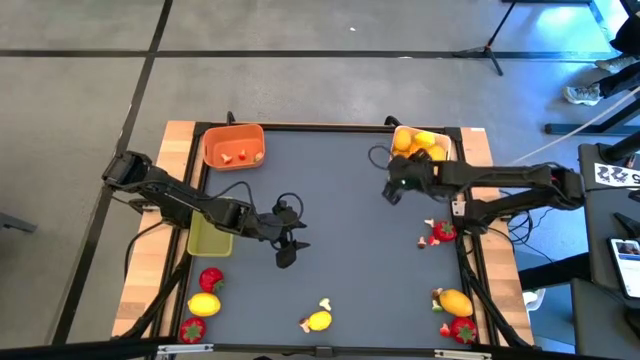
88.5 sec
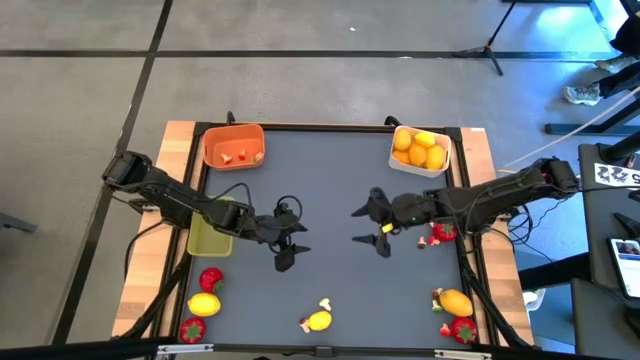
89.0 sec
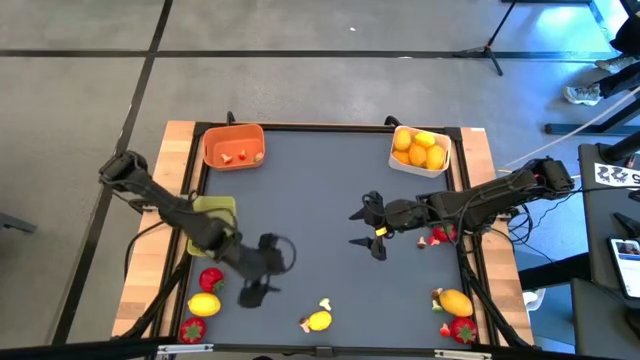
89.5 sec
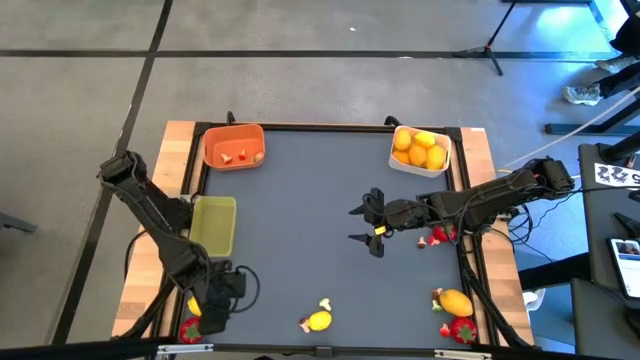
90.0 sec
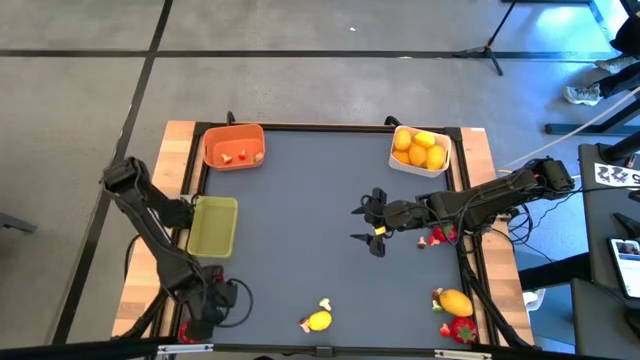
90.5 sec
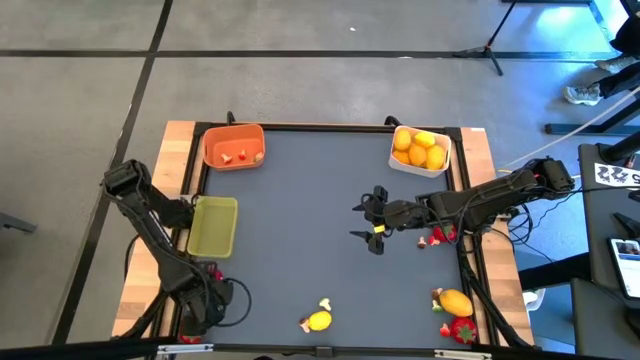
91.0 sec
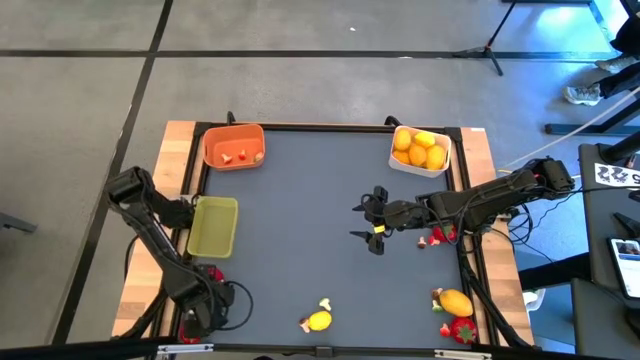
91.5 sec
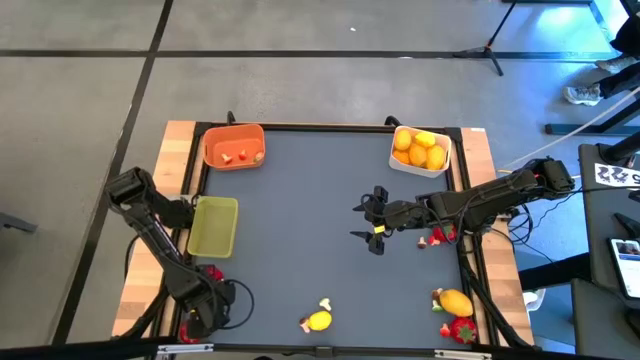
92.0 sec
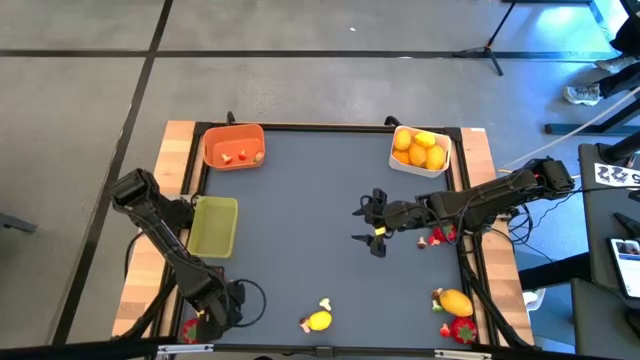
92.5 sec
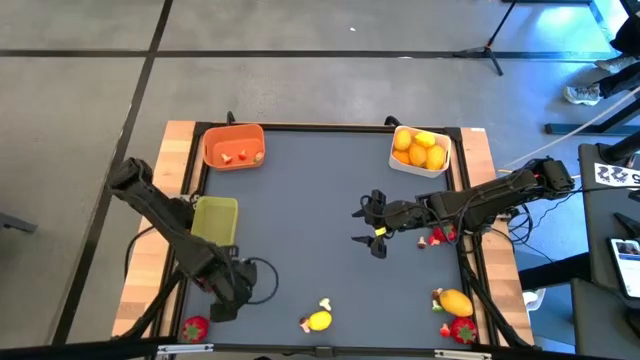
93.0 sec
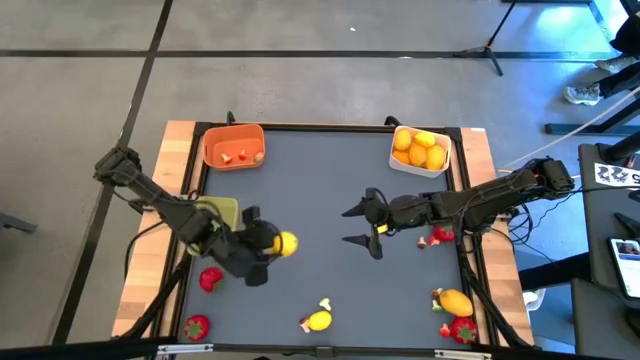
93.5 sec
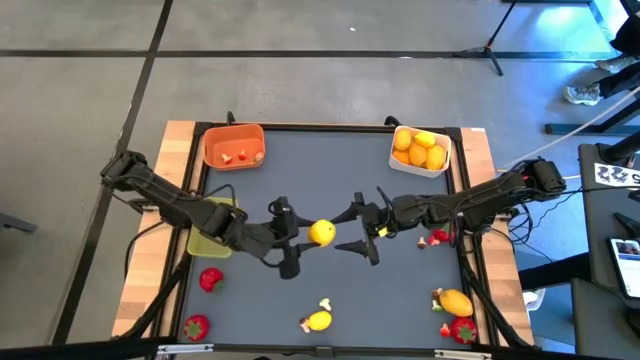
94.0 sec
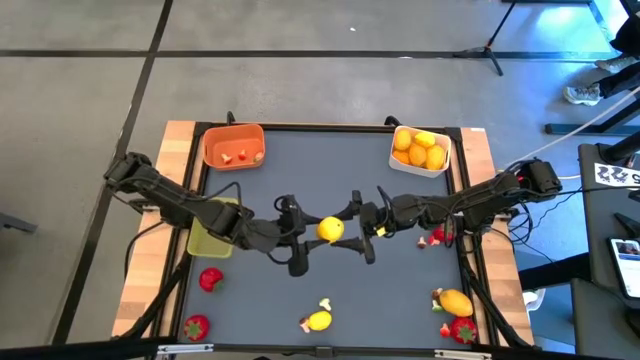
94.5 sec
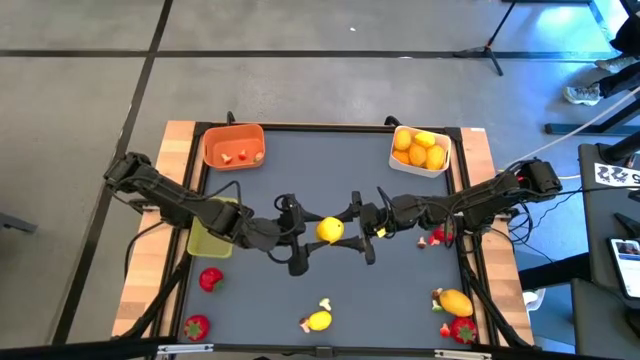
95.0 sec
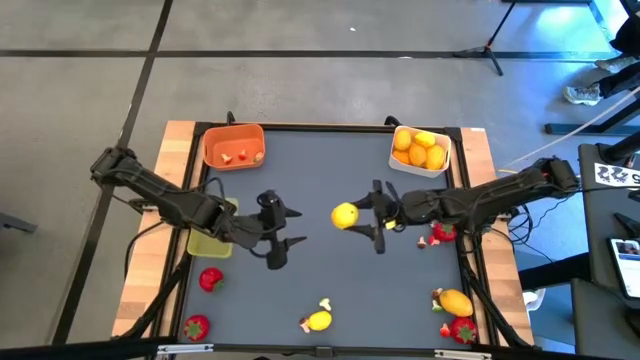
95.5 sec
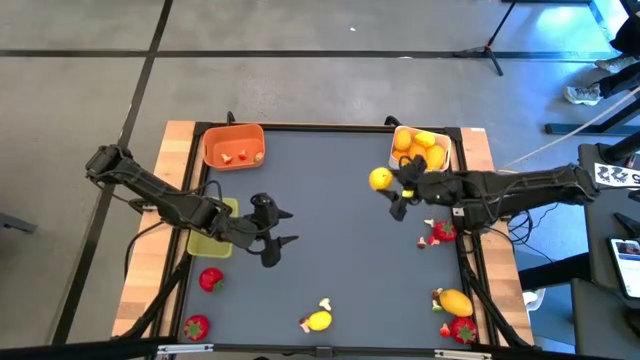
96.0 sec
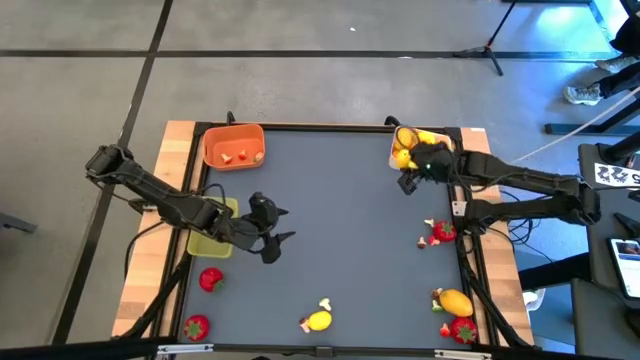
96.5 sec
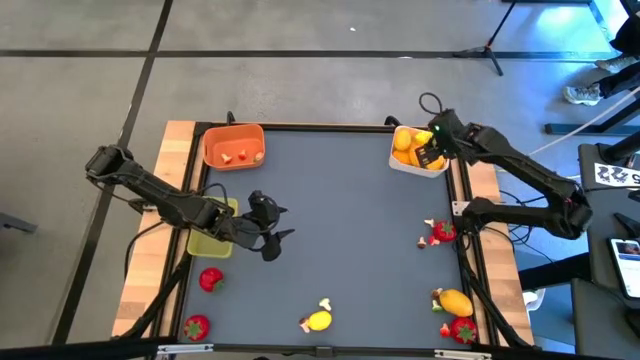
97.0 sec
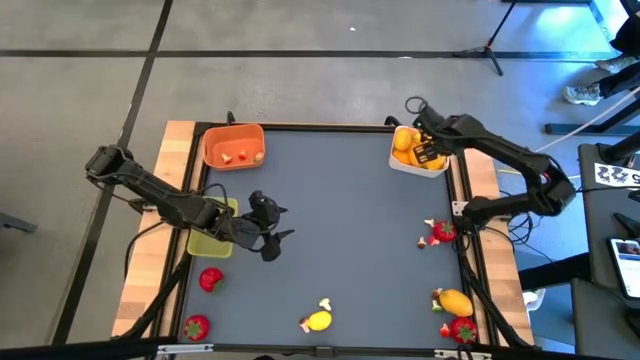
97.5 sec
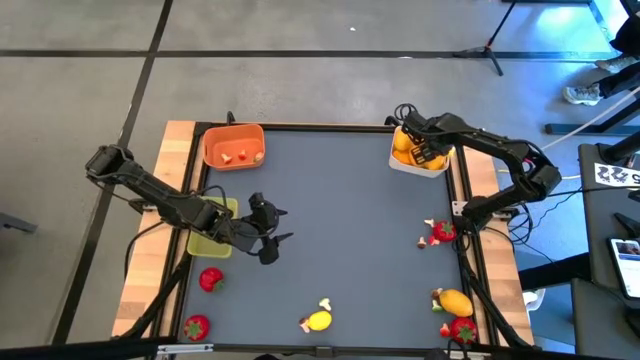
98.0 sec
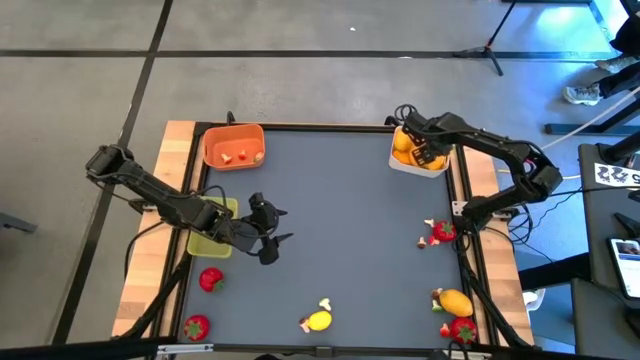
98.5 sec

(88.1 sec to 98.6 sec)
Task: Sort produce into baskets
Put the lemon into the white bin

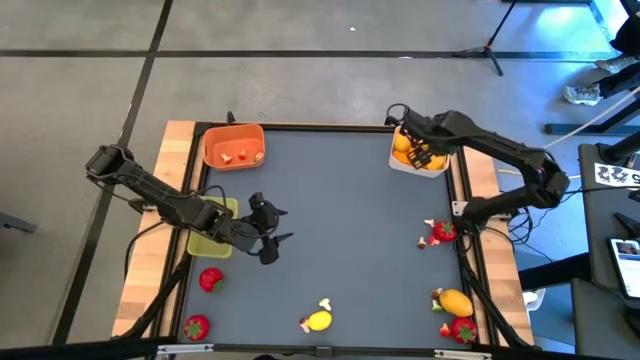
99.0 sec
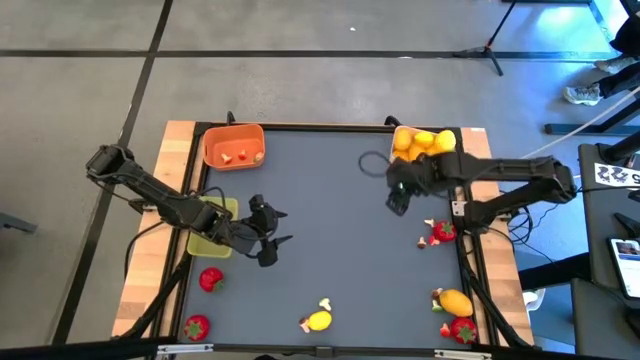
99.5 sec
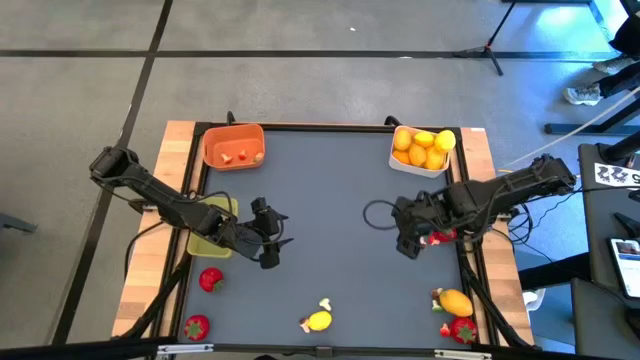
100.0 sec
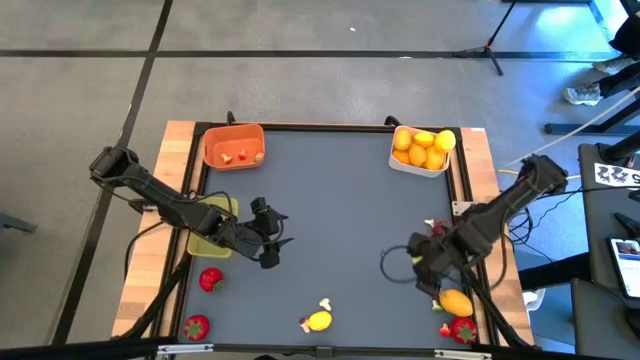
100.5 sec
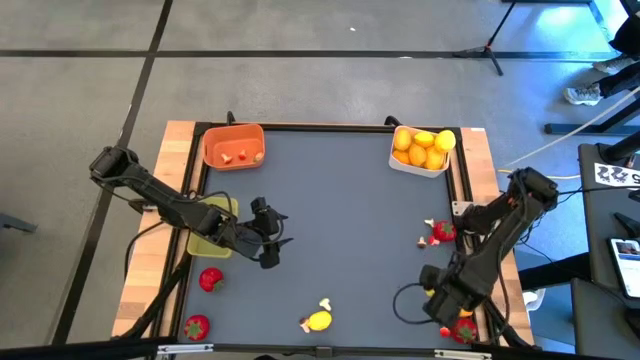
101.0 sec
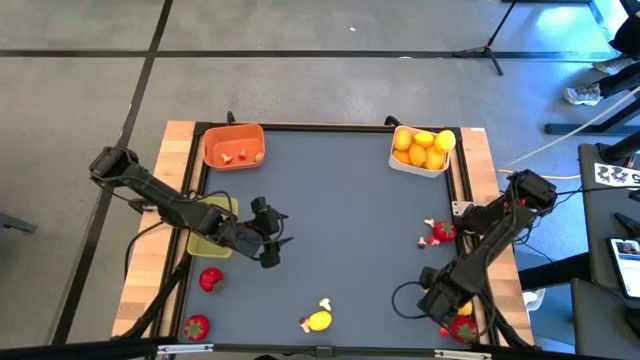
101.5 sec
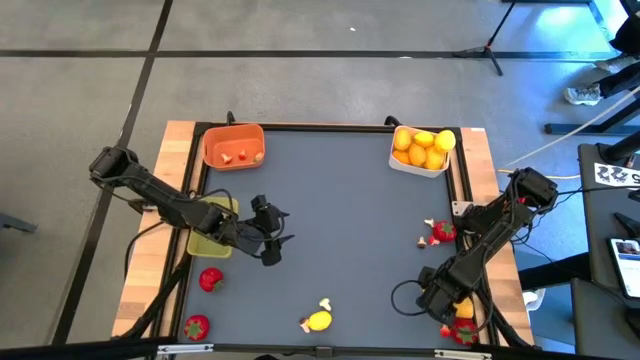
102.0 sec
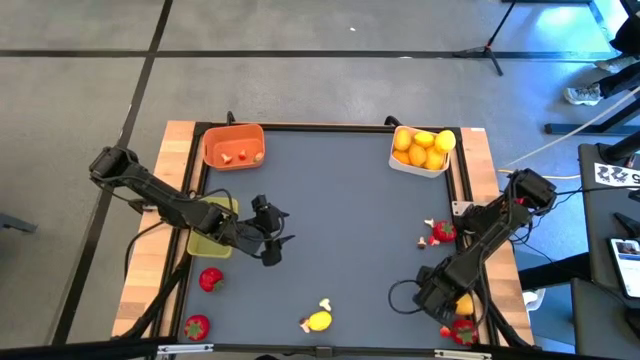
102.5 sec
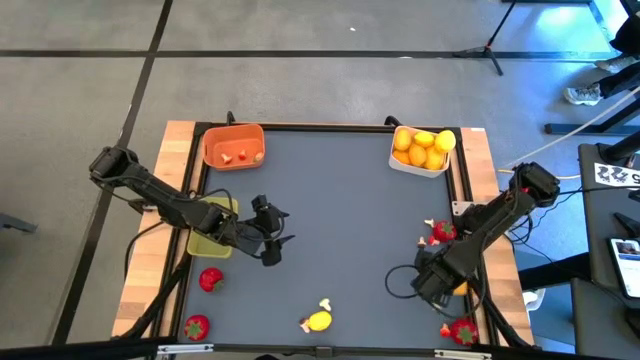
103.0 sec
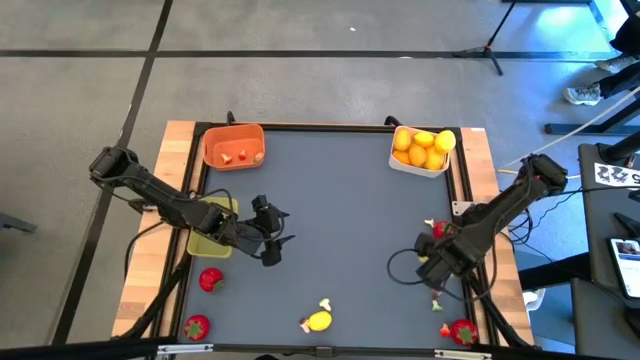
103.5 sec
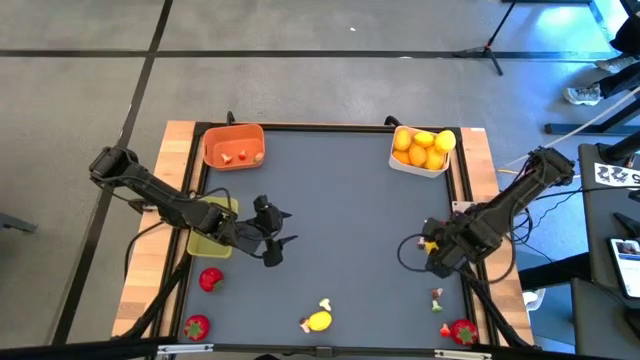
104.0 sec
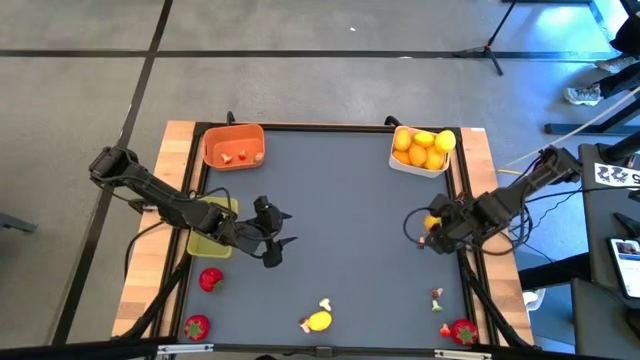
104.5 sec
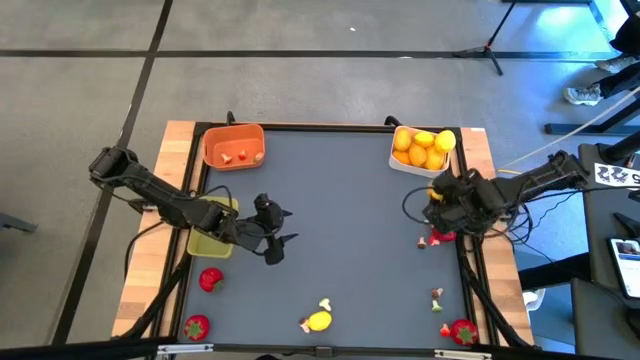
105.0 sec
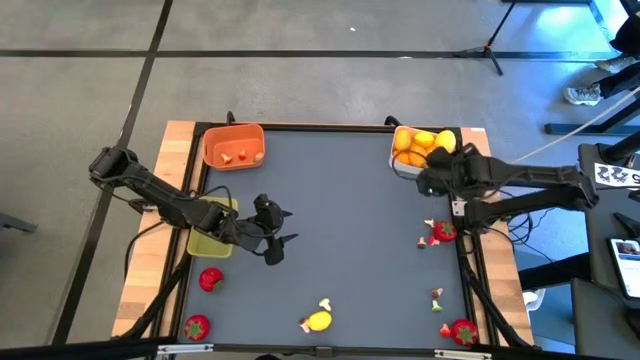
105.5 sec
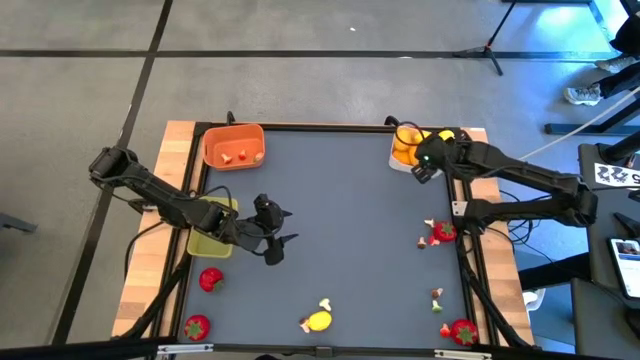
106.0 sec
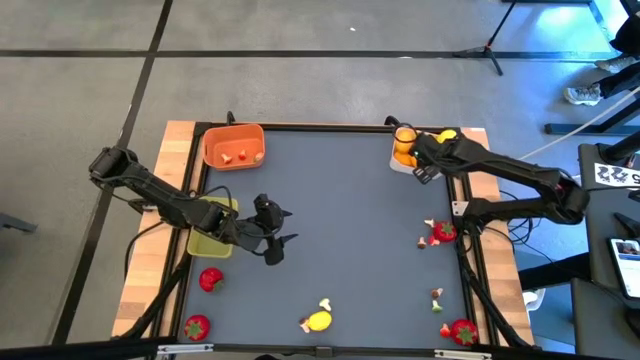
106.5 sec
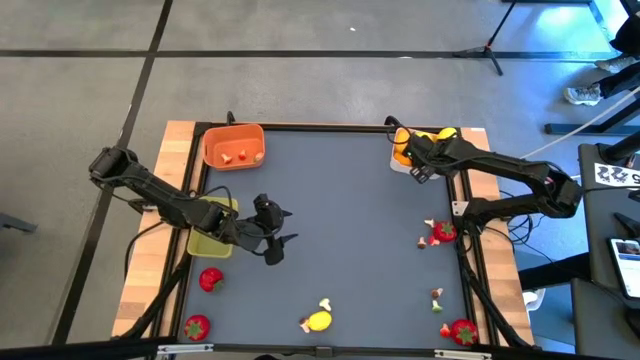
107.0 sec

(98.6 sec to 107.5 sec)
Put the lemon into the white bin

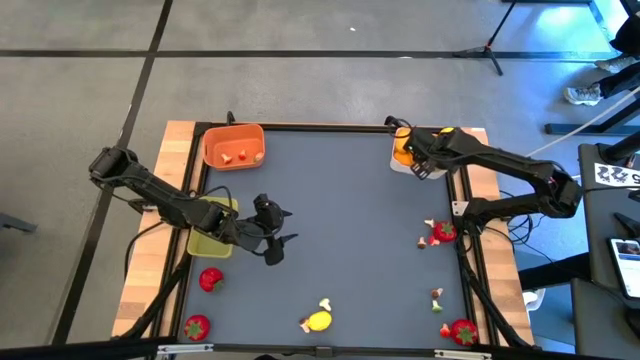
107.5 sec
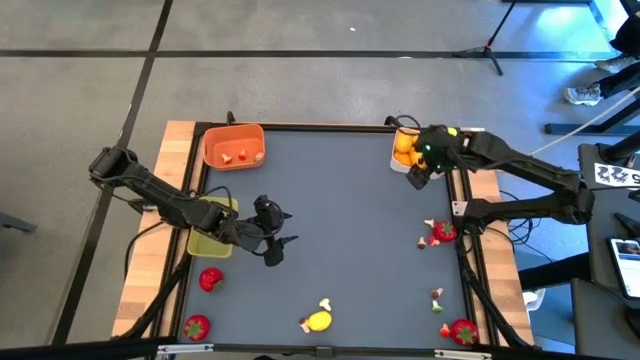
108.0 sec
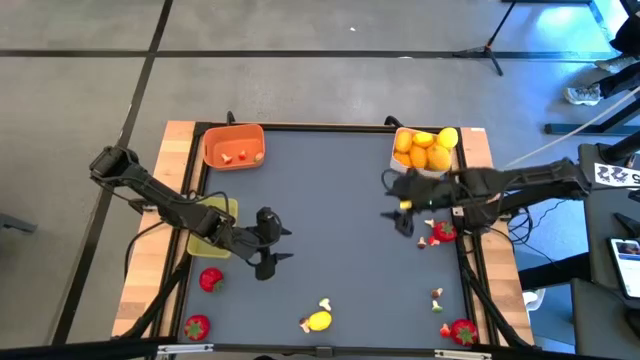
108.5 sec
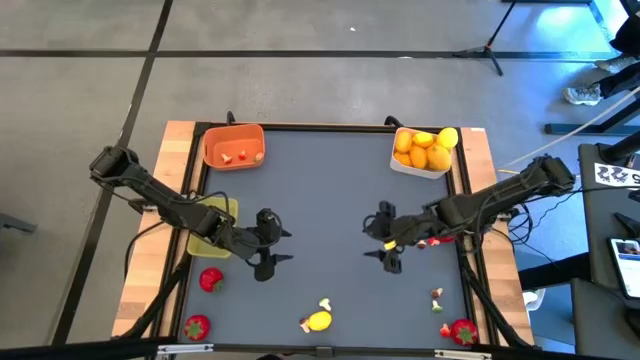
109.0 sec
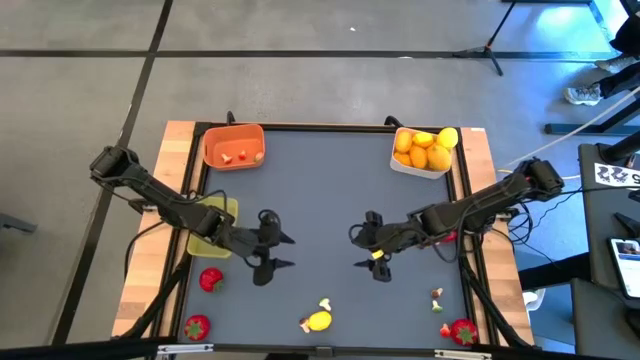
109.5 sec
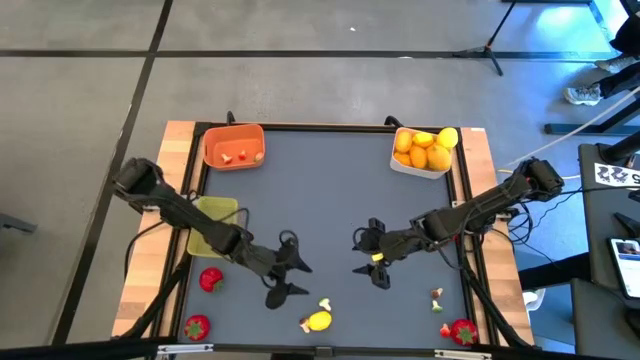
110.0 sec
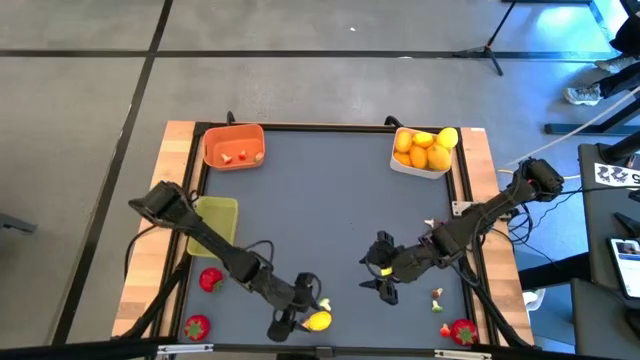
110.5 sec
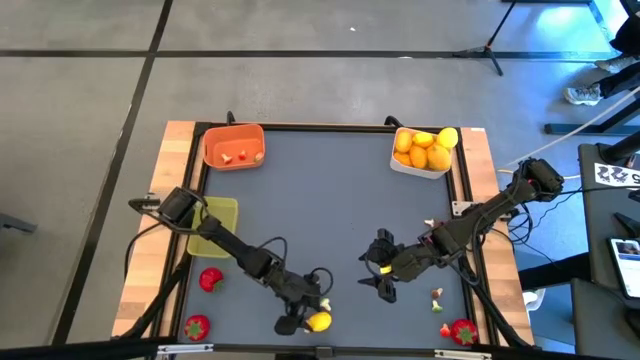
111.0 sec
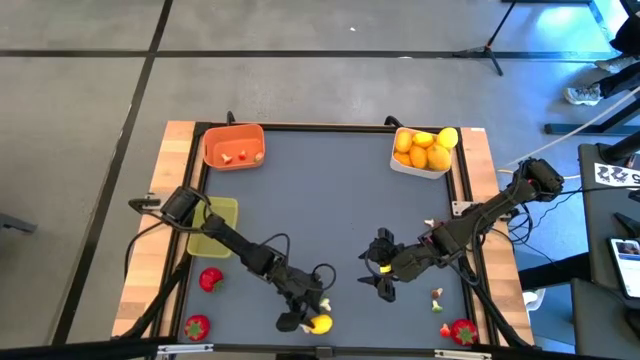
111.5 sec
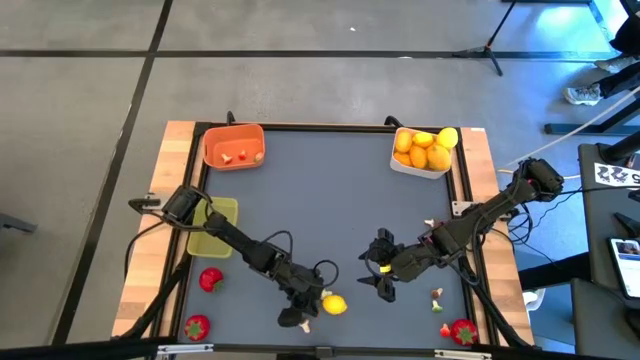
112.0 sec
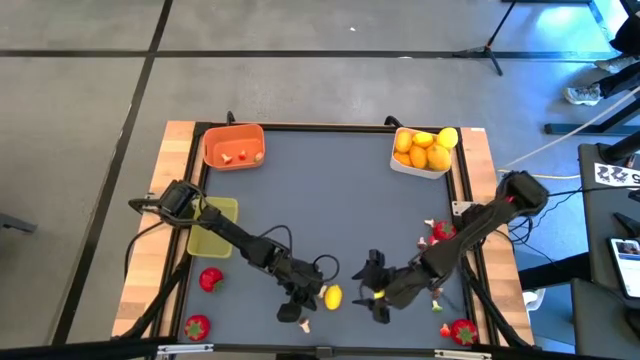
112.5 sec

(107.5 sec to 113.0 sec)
Put the lemon into the white bin
